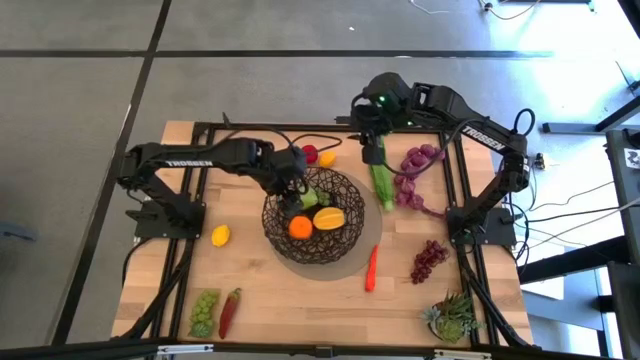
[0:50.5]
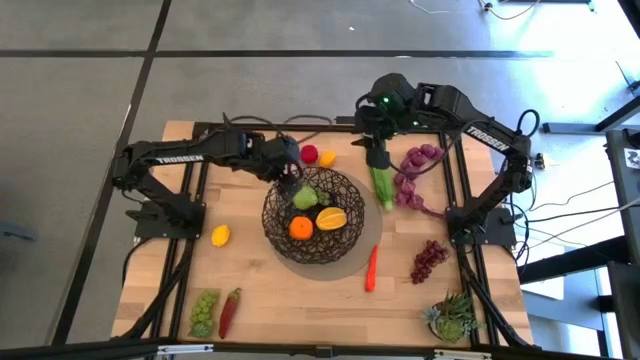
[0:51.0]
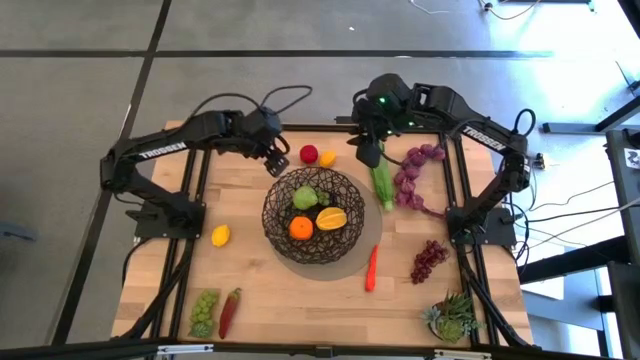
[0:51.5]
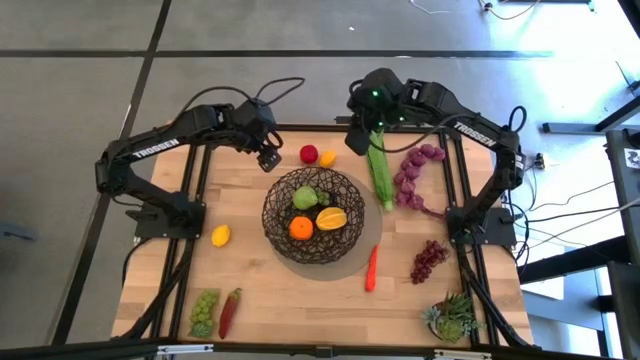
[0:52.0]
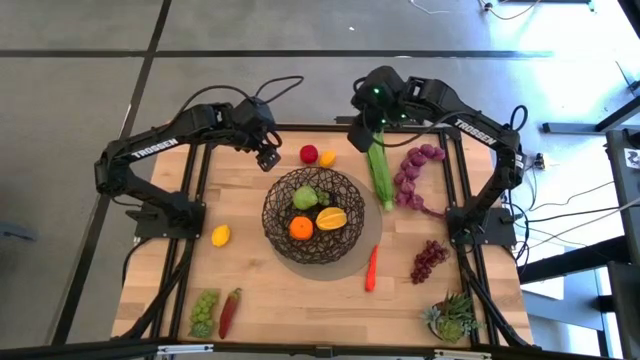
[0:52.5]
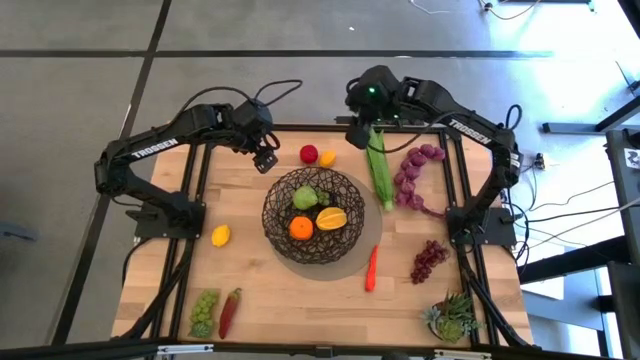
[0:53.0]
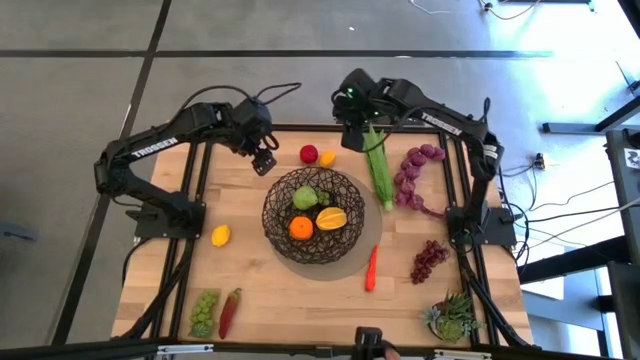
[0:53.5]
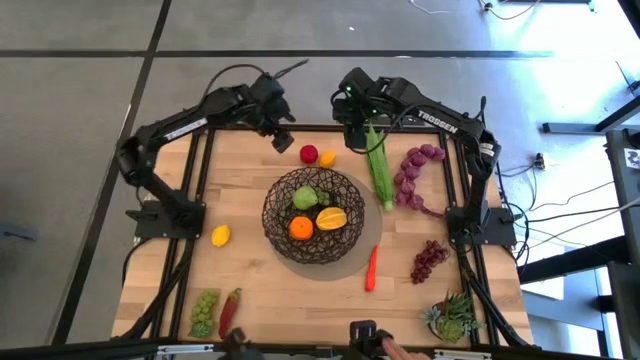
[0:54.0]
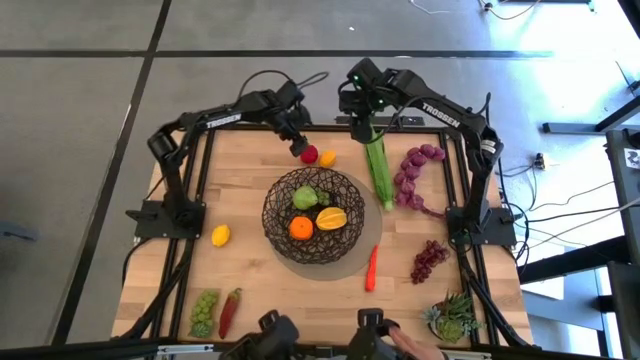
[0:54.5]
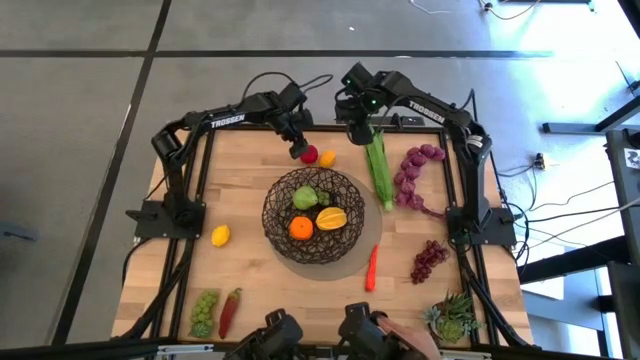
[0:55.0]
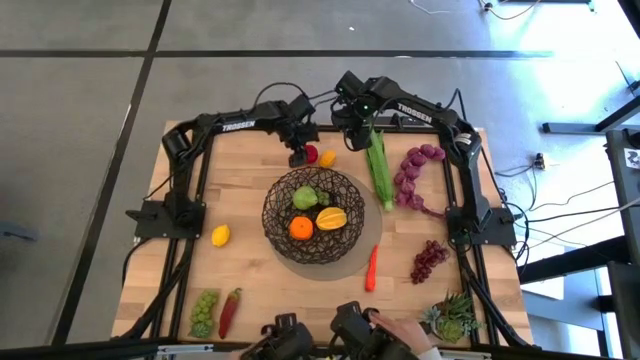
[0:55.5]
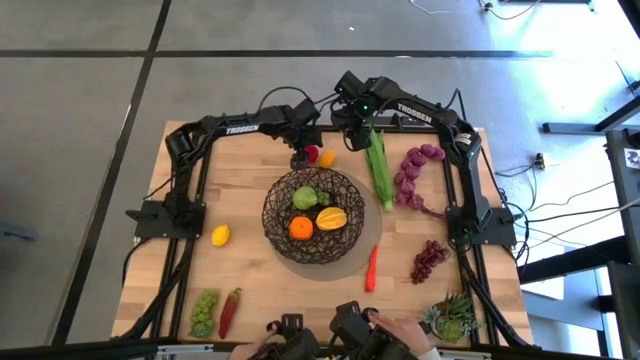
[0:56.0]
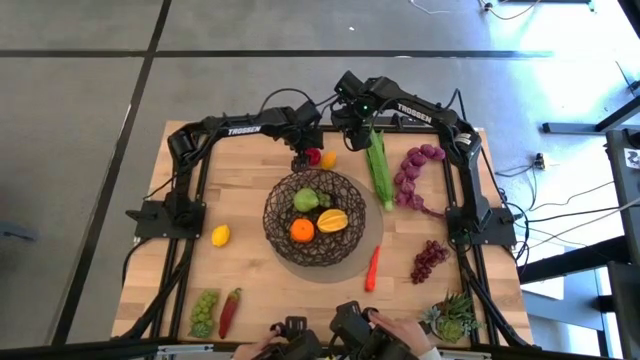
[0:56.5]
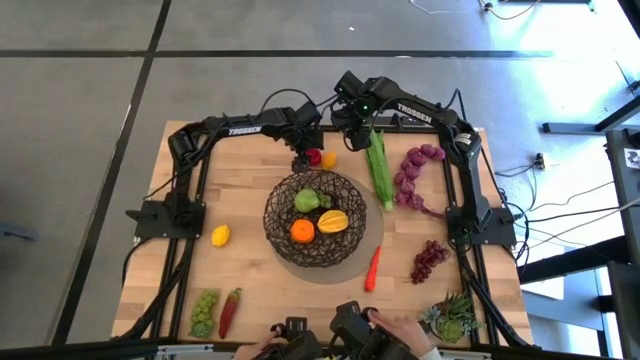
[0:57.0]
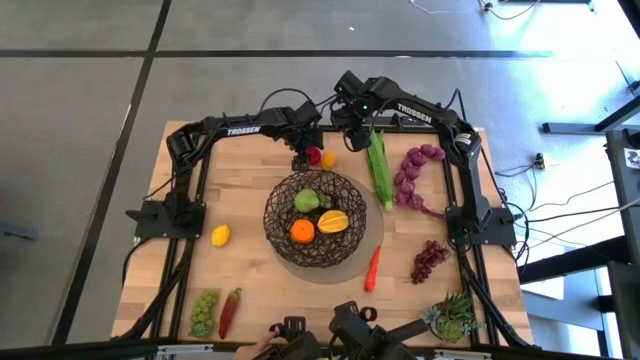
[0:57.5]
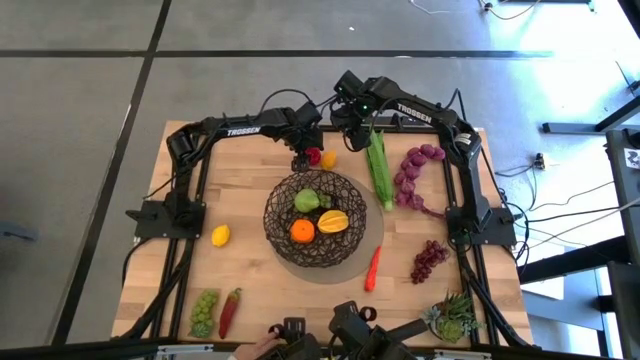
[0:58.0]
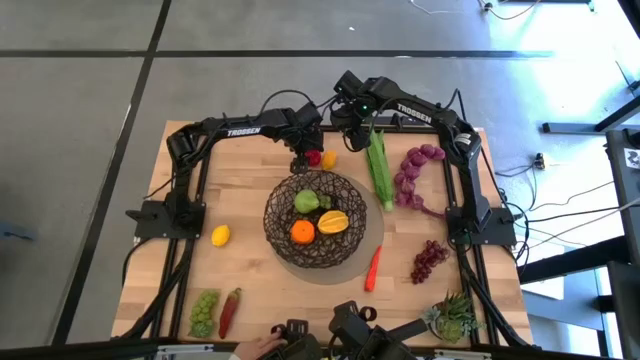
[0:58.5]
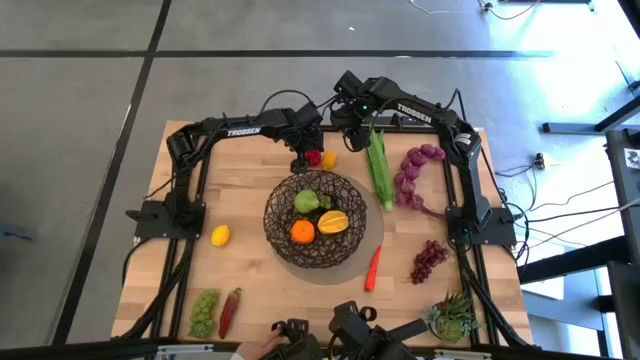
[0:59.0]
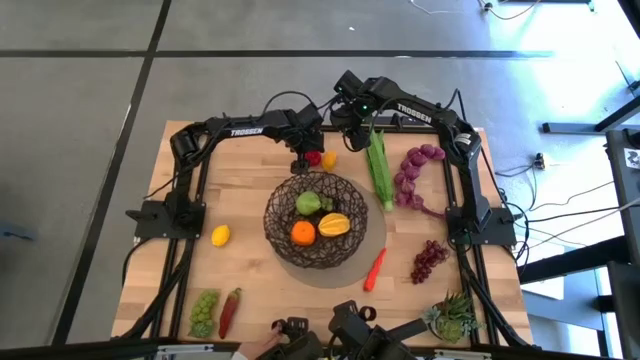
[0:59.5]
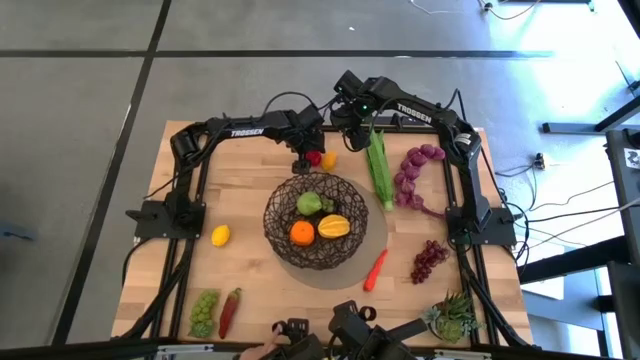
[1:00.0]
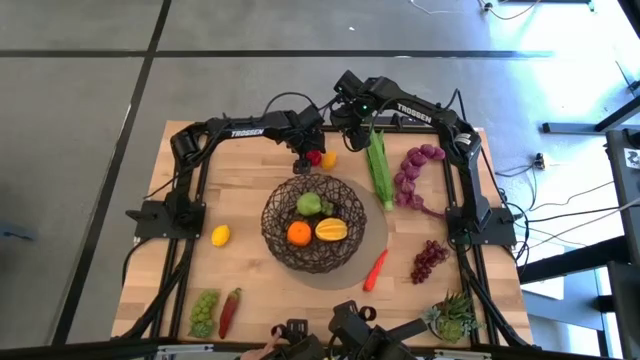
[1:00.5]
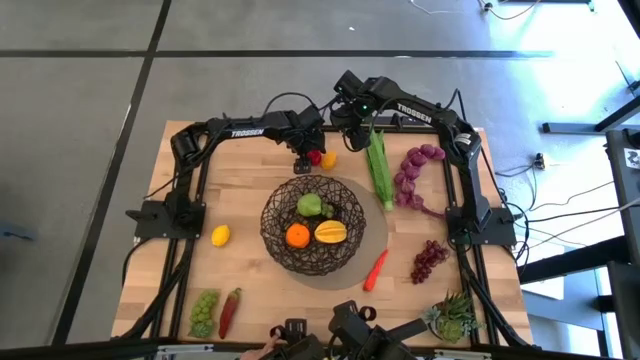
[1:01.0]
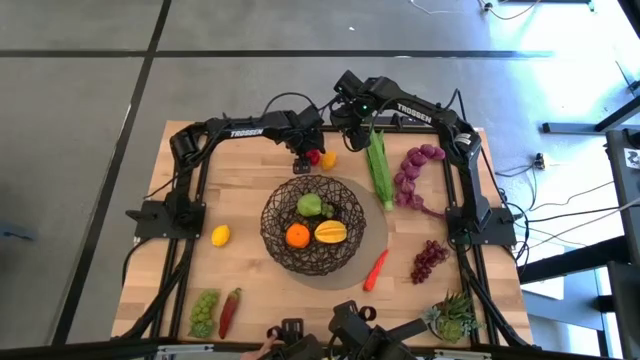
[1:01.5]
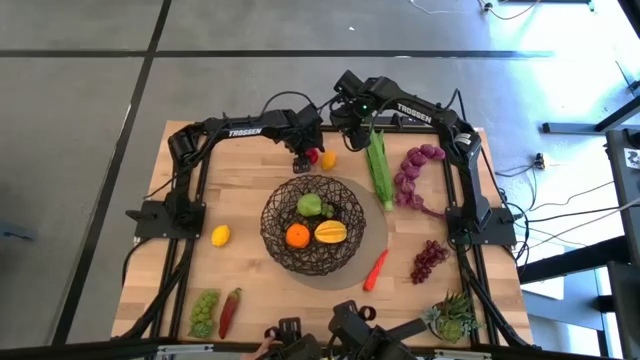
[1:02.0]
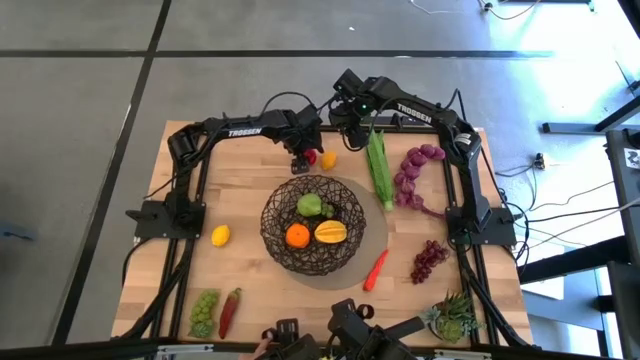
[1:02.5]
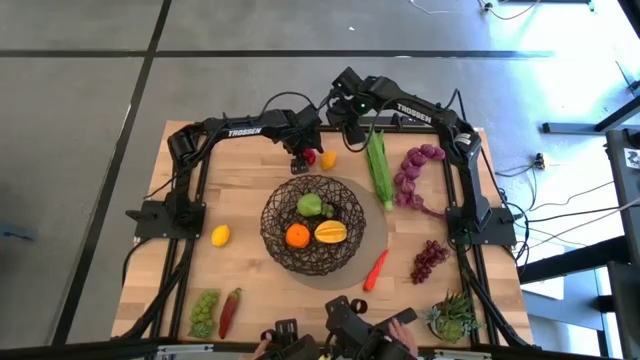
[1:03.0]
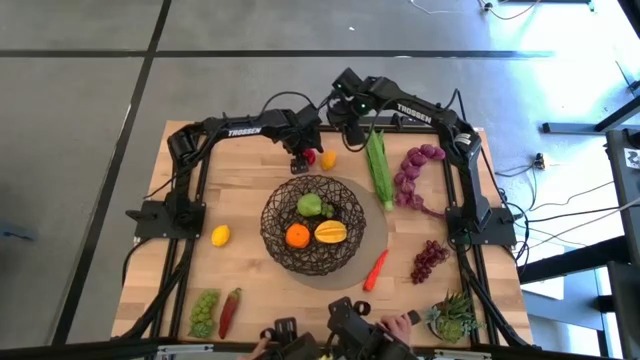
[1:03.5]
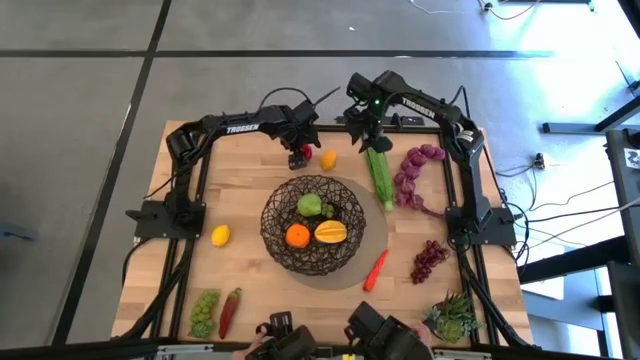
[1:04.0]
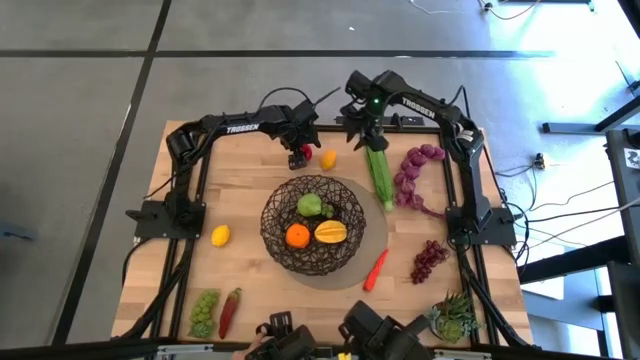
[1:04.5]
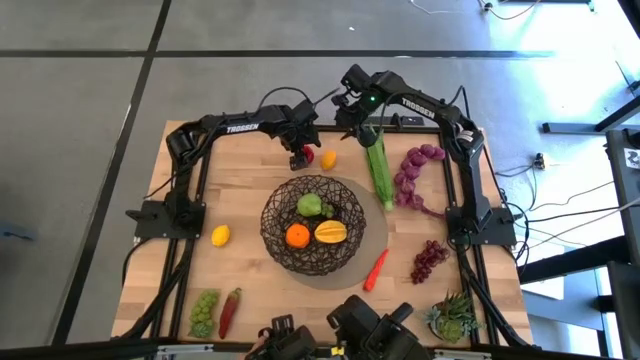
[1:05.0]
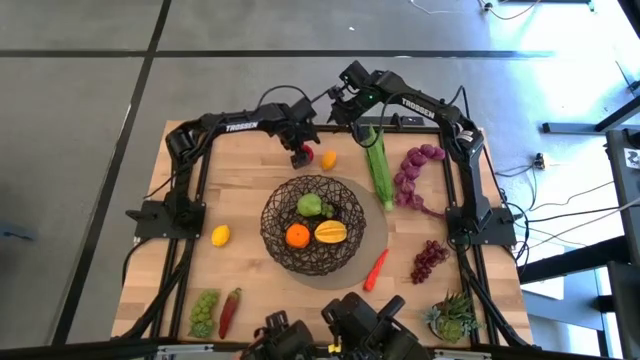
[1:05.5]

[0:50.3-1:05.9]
Task: Build produce basket
Put the tomato into the wire basket

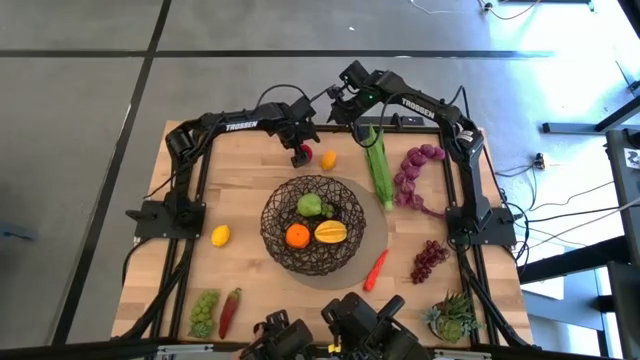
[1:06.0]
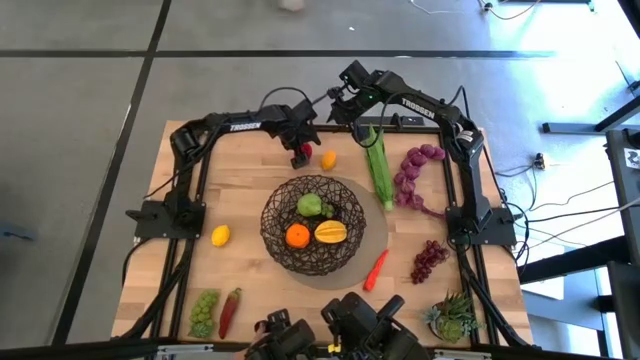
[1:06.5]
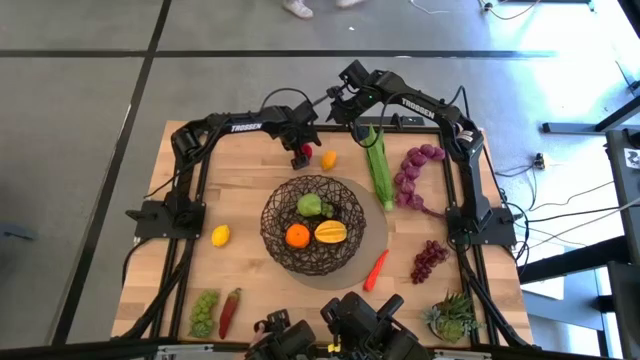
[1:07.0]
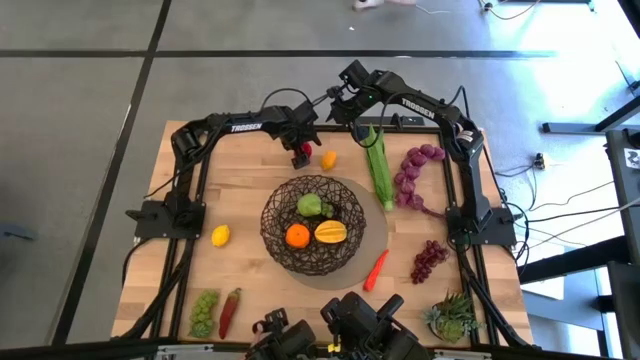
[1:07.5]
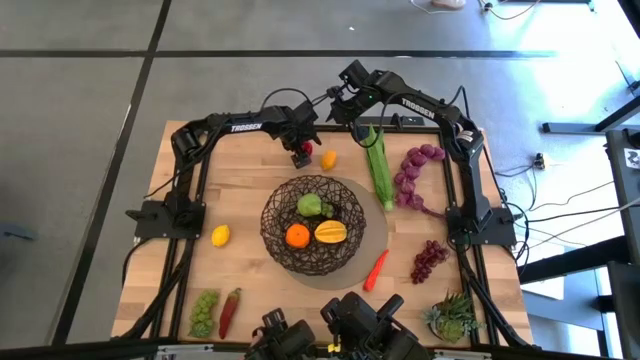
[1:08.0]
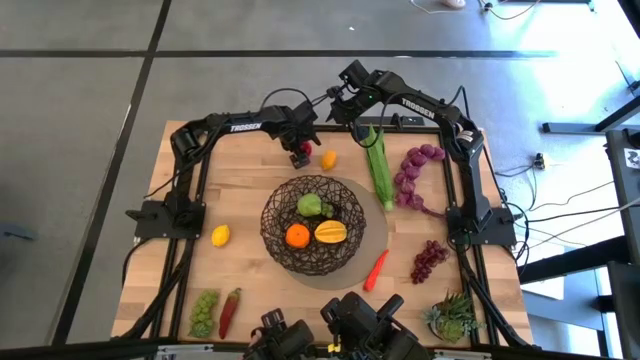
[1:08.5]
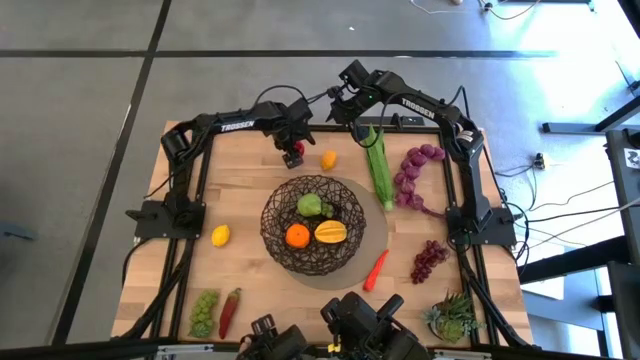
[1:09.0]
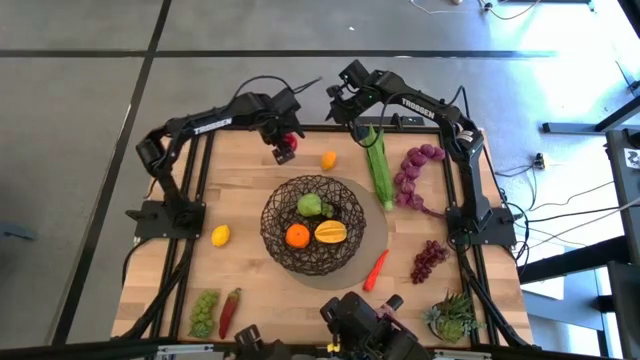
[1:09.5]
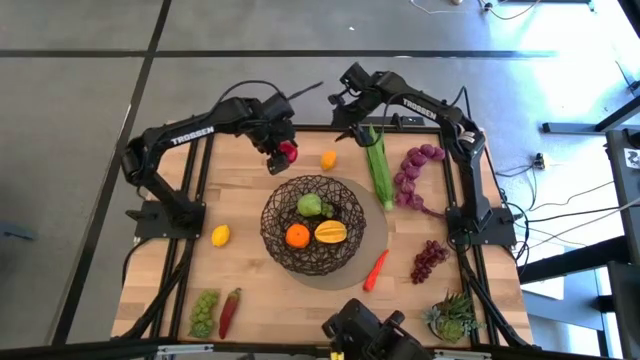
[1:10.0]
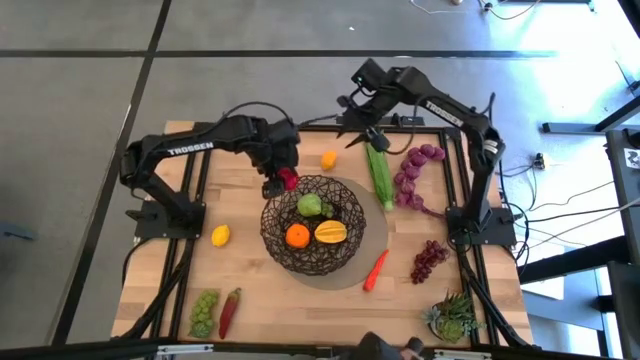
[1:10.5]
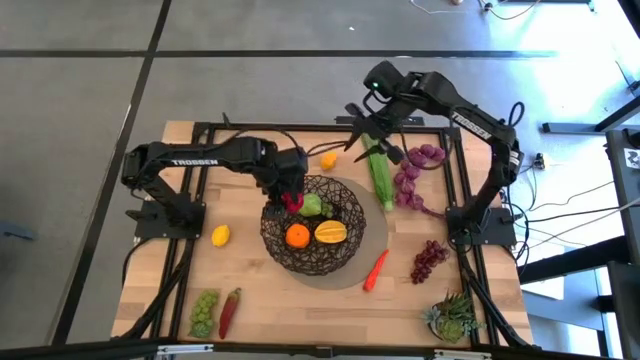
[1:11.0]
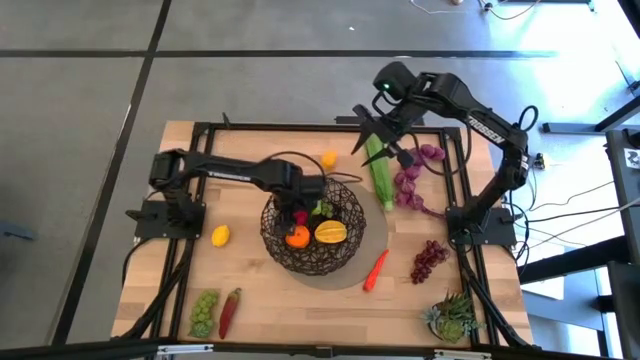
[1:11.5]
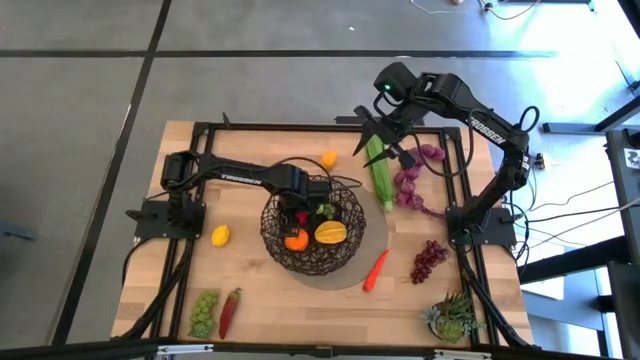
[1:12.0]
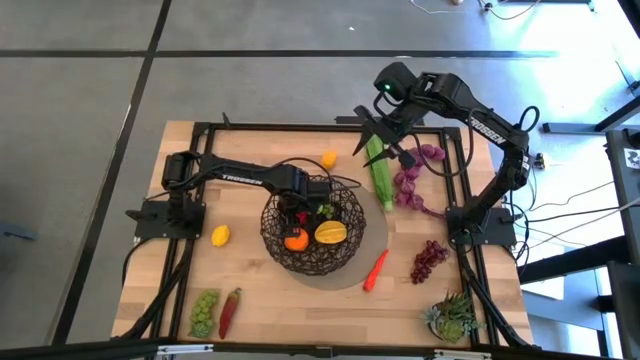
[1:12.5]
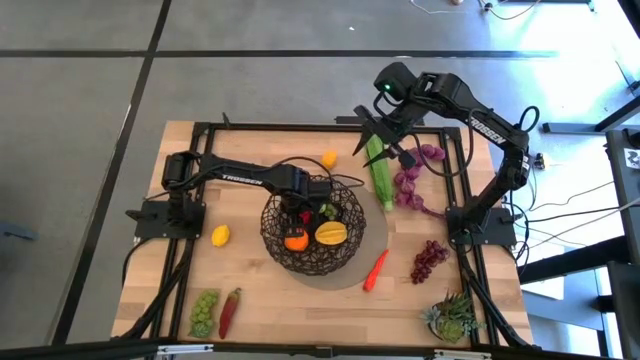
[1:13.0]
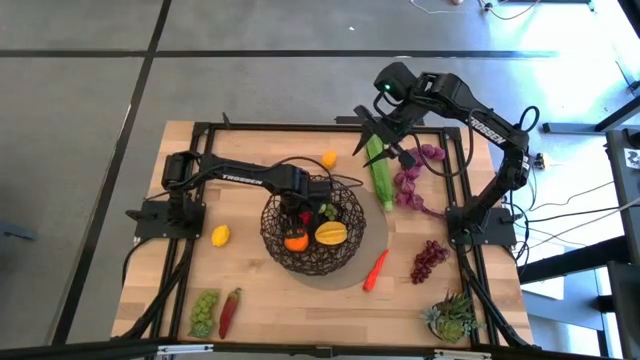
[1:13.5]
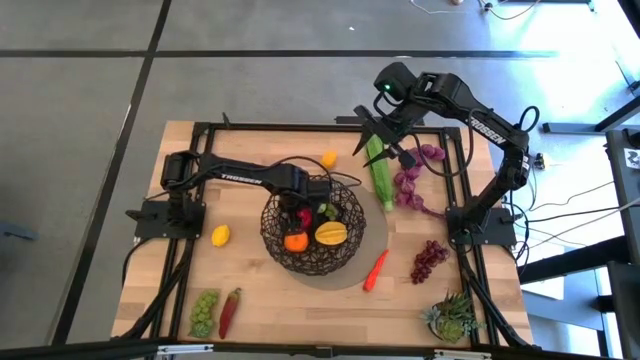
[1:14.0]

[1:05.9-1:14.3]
Put the tomato into the wire basket
